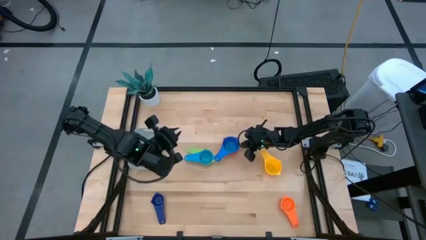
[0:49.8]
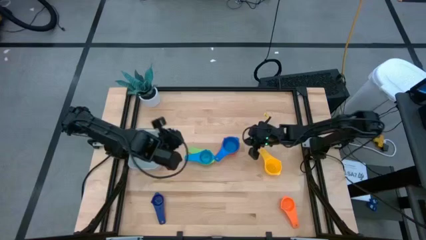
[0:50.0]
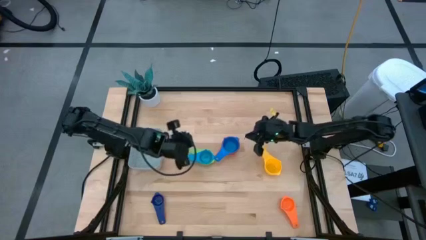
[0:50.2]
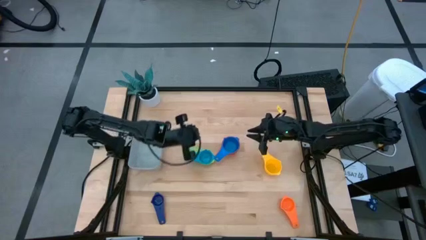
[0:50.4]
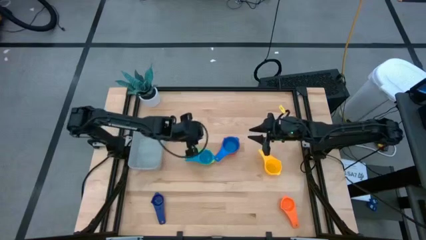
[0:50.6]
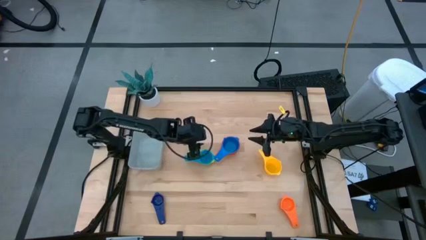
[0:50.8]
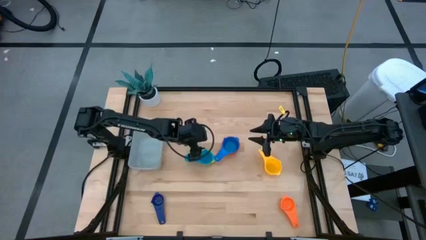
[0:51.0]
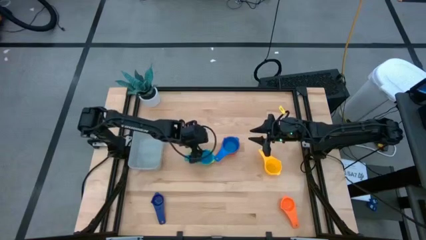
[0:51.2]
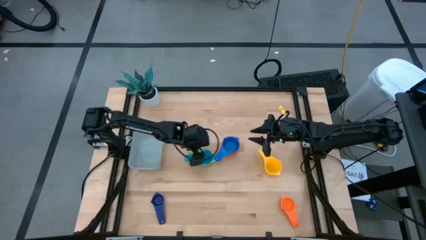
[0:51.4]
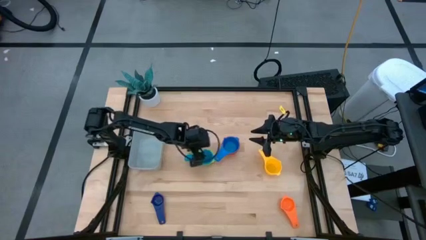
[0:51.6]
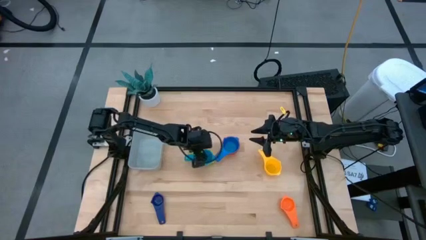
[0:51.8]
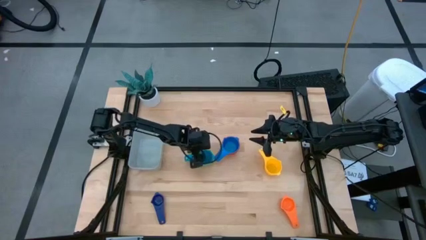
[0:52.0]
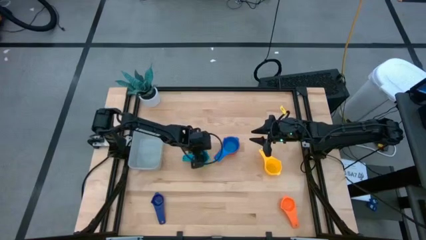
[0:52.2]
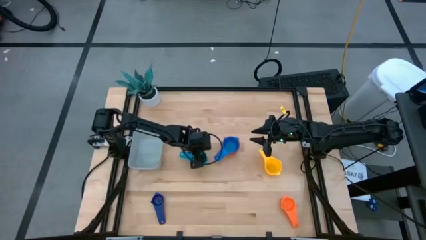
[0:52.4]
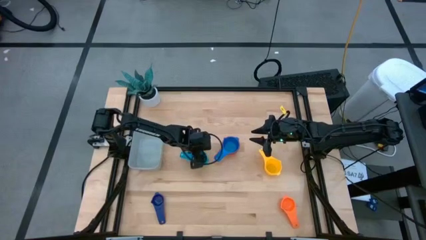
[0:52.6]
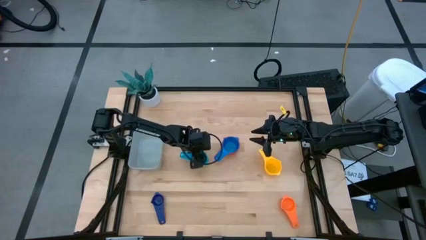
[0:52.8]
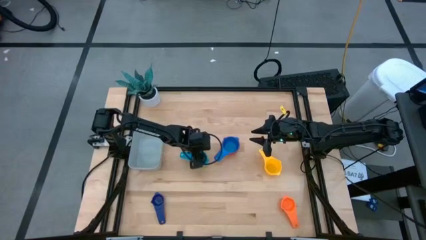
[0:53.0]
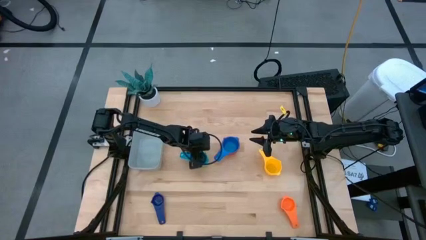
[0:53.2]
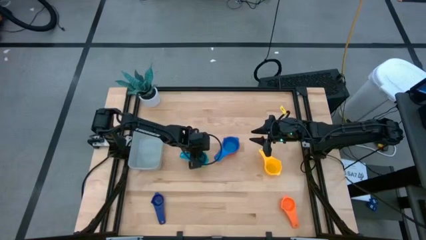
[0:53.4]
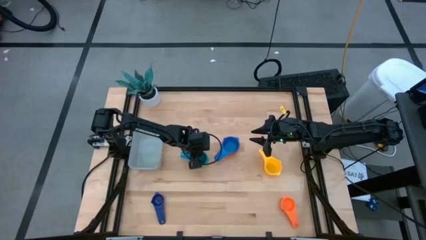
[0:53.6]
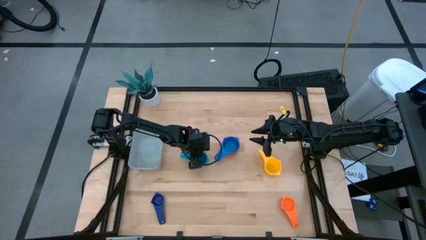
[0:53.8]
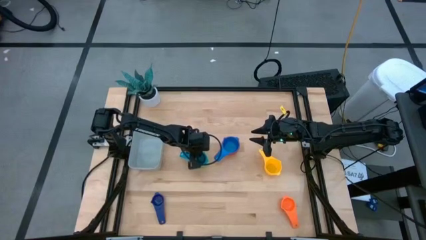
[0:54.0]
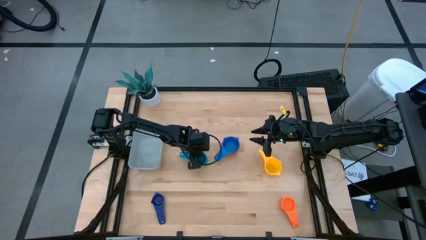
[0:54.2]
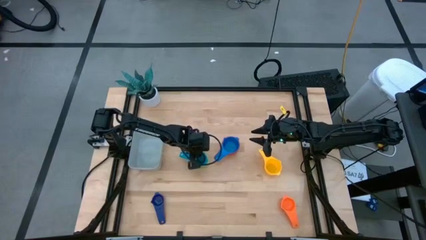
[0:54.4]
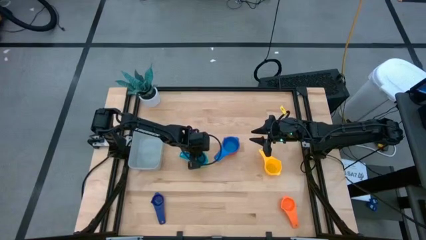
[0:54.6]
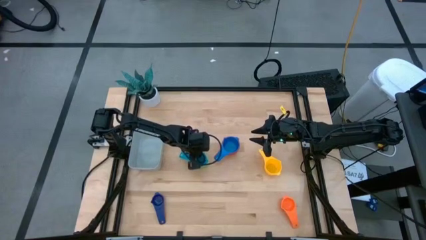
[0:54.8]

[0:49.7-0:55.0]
Task: Nest measuring cups in basket
Stack the left stacked measuring cups on top of the yellow measuring cup

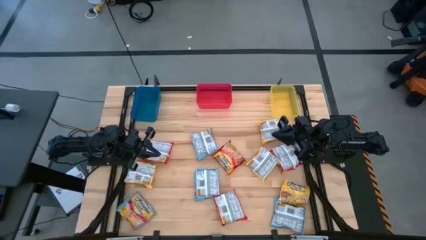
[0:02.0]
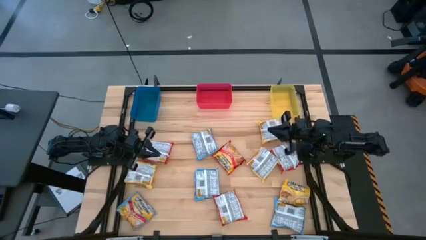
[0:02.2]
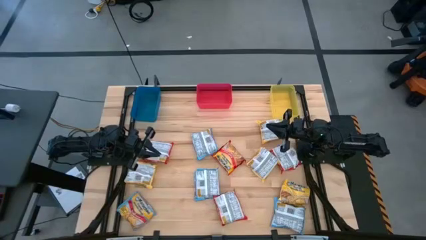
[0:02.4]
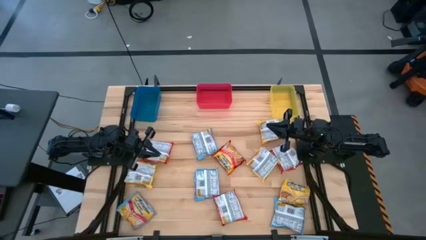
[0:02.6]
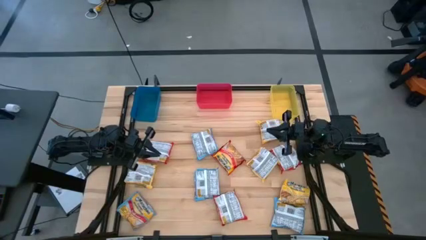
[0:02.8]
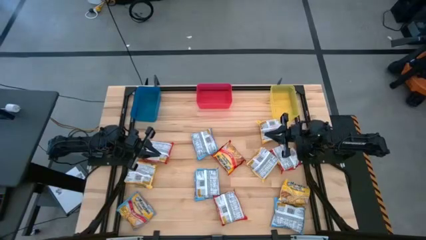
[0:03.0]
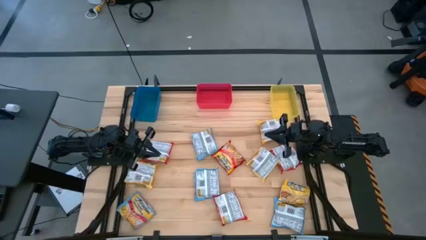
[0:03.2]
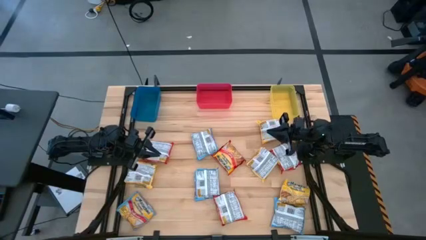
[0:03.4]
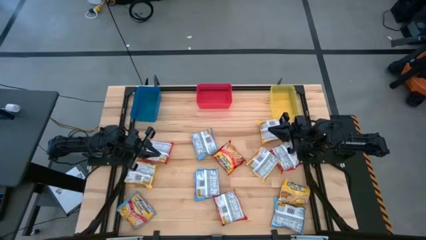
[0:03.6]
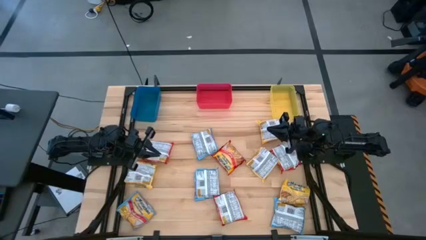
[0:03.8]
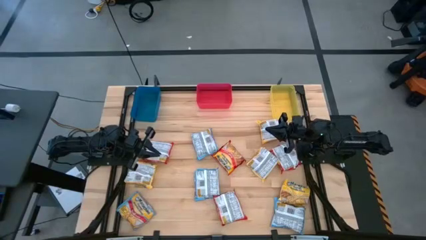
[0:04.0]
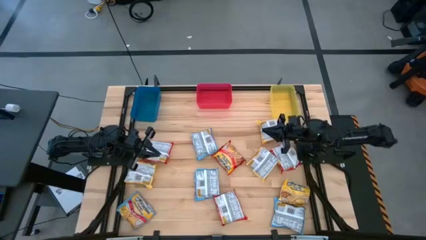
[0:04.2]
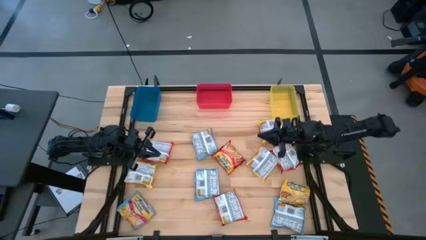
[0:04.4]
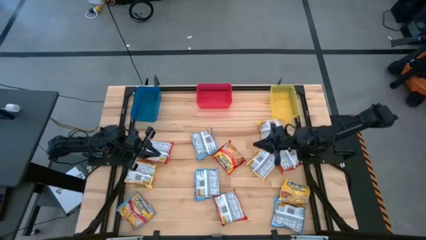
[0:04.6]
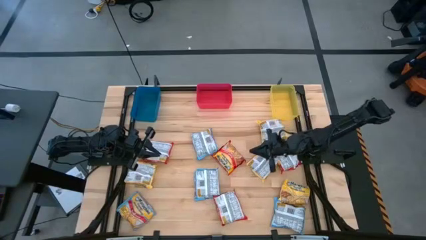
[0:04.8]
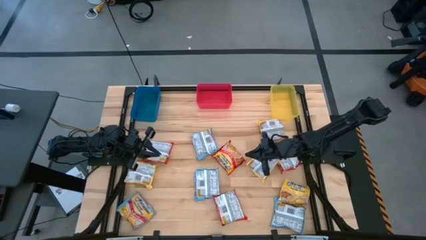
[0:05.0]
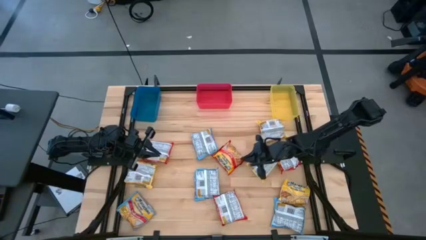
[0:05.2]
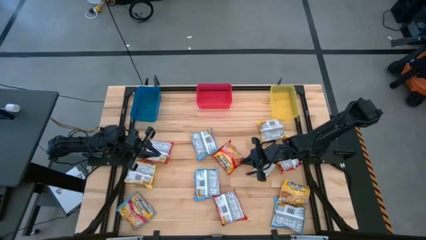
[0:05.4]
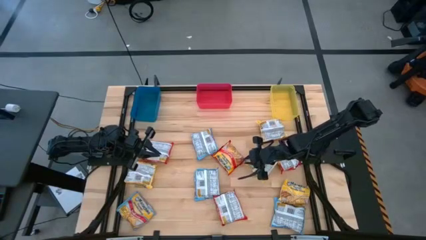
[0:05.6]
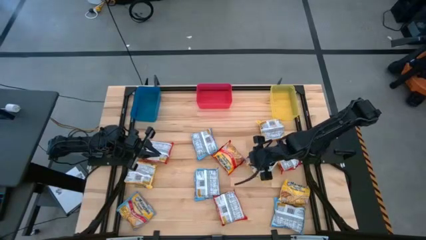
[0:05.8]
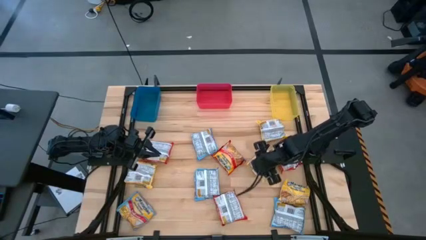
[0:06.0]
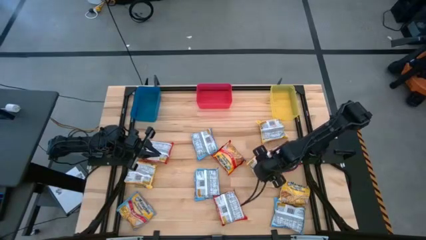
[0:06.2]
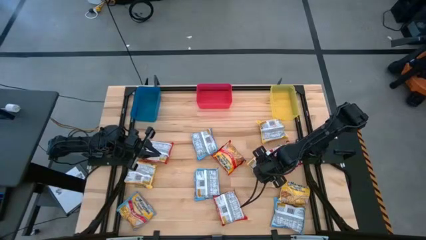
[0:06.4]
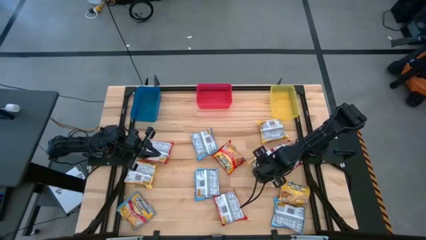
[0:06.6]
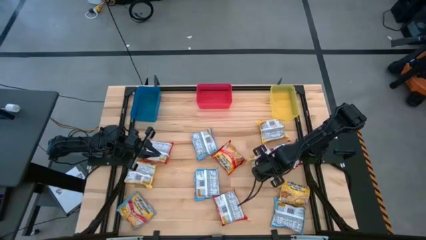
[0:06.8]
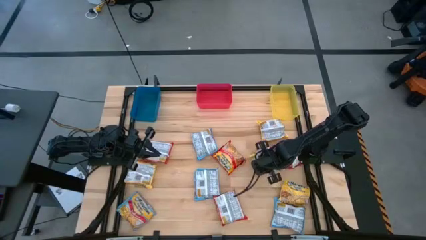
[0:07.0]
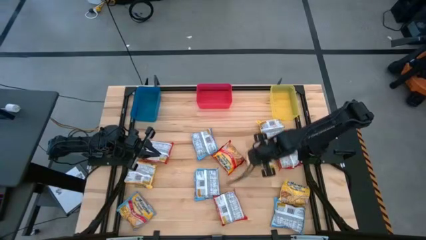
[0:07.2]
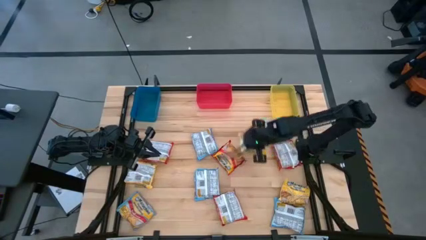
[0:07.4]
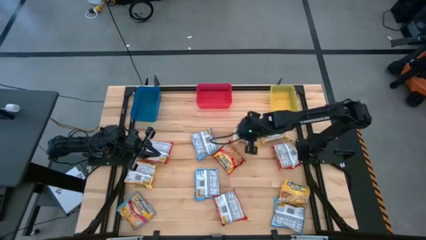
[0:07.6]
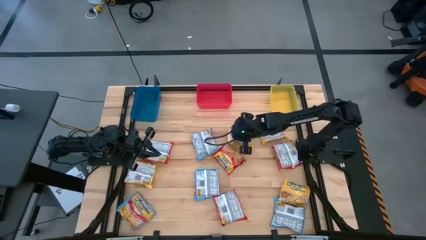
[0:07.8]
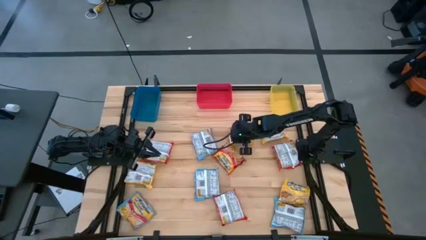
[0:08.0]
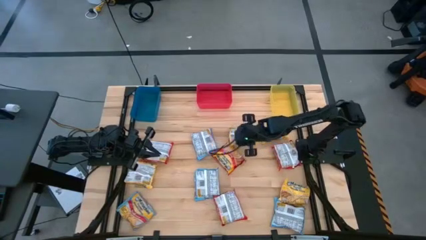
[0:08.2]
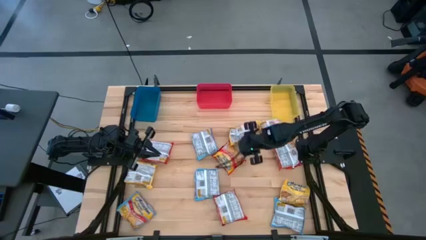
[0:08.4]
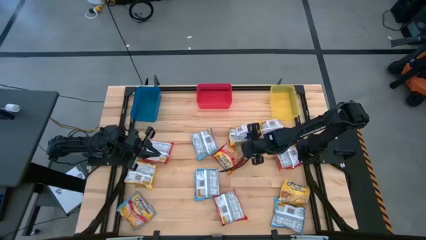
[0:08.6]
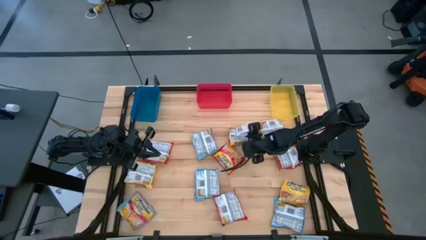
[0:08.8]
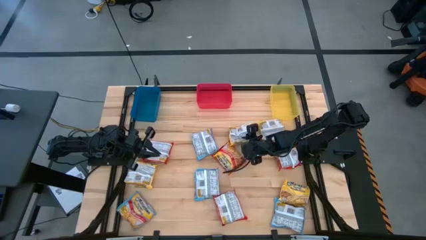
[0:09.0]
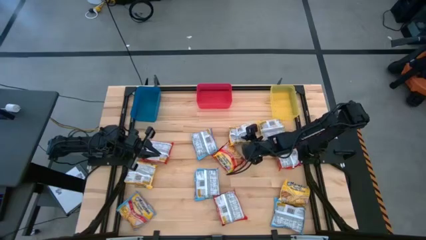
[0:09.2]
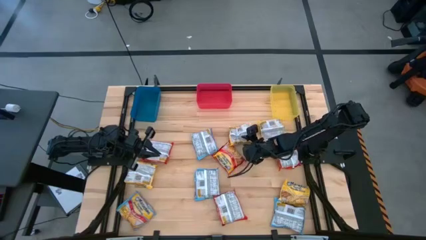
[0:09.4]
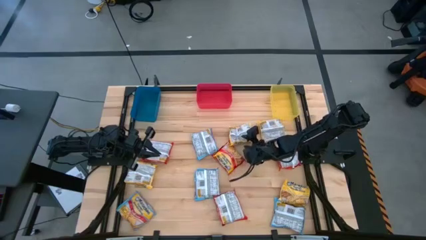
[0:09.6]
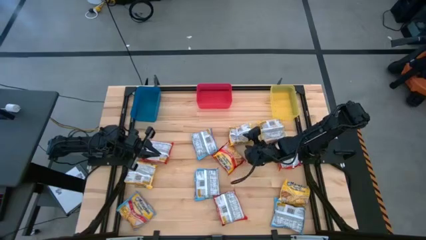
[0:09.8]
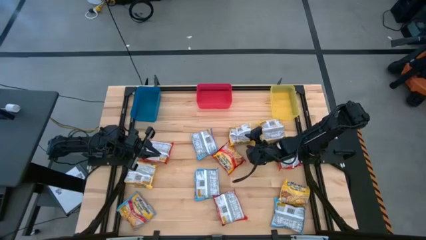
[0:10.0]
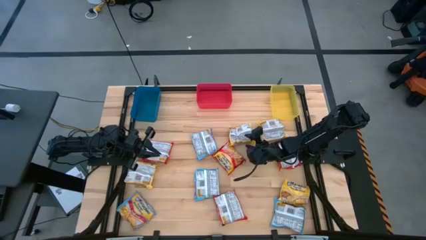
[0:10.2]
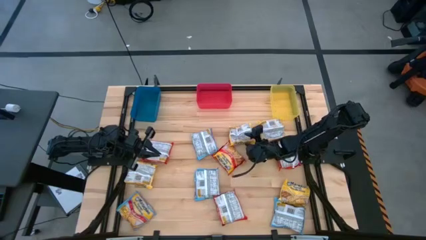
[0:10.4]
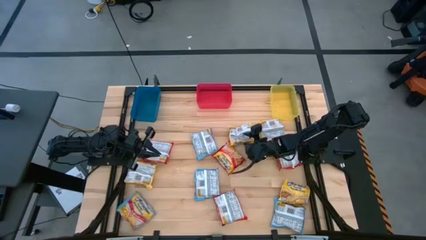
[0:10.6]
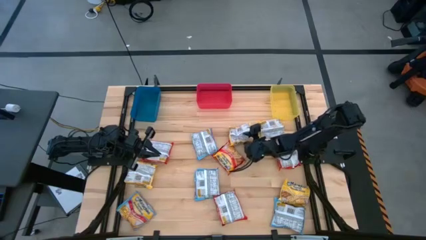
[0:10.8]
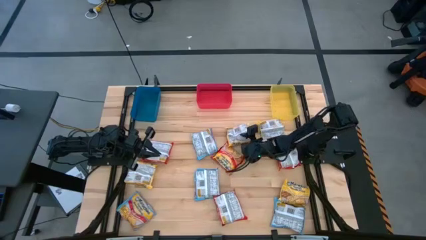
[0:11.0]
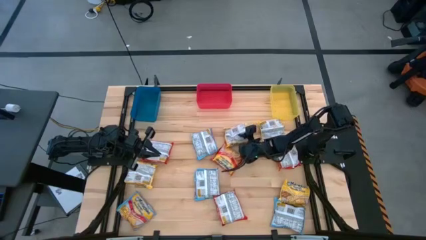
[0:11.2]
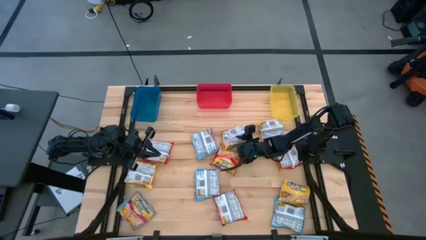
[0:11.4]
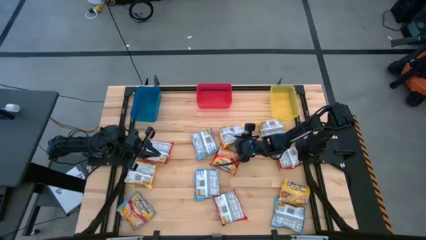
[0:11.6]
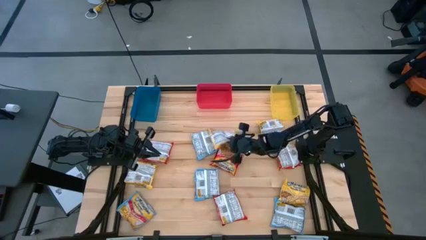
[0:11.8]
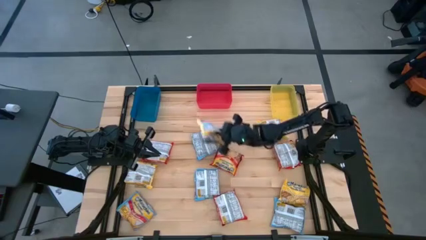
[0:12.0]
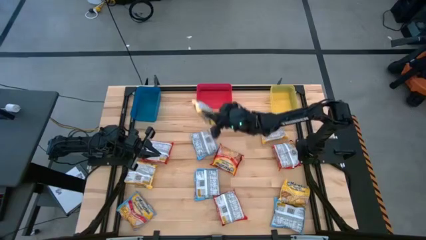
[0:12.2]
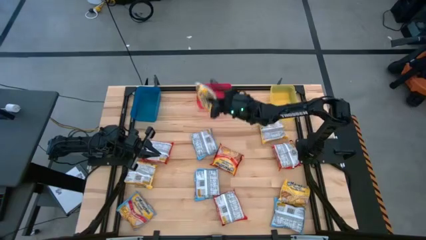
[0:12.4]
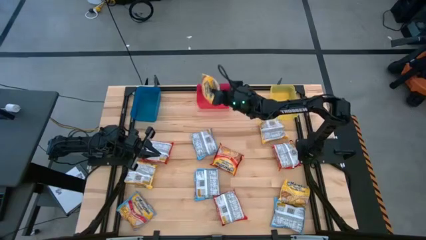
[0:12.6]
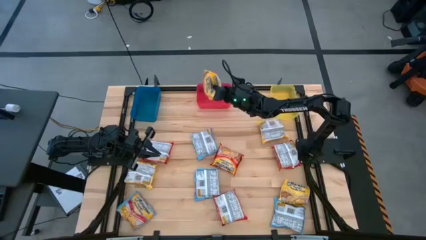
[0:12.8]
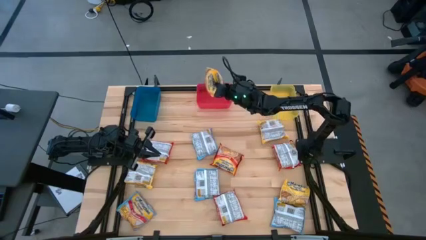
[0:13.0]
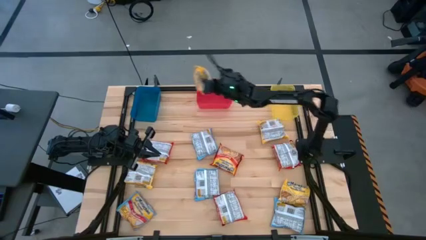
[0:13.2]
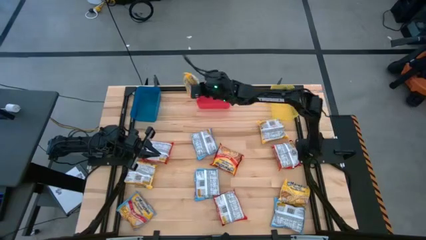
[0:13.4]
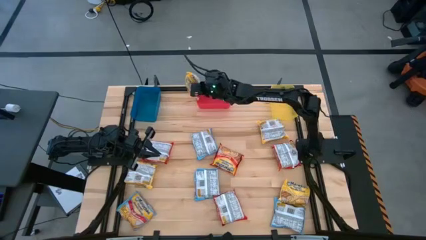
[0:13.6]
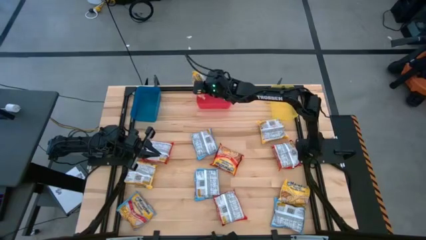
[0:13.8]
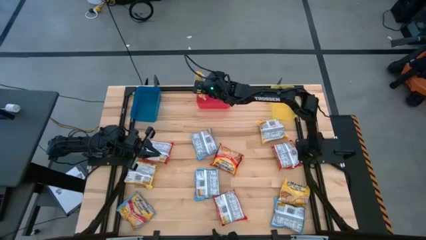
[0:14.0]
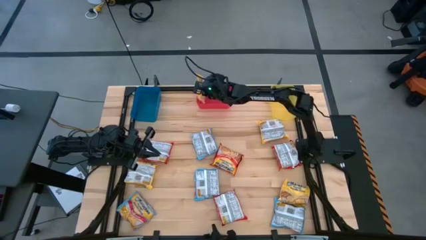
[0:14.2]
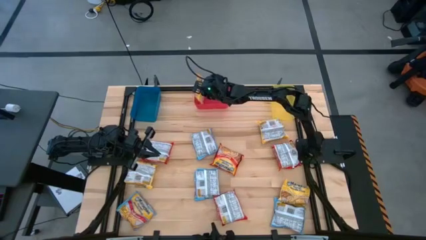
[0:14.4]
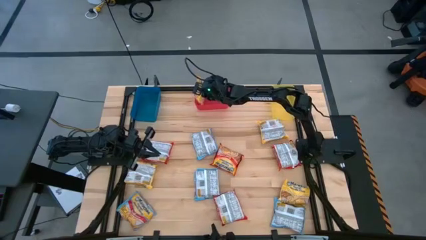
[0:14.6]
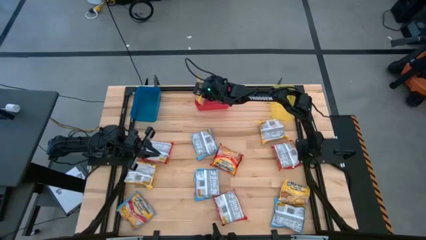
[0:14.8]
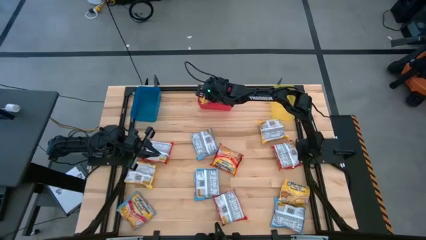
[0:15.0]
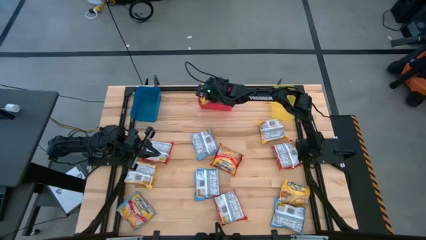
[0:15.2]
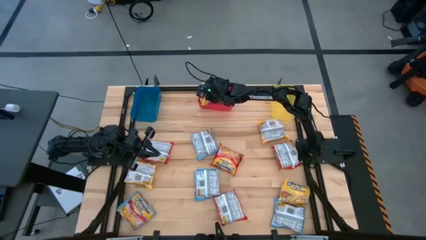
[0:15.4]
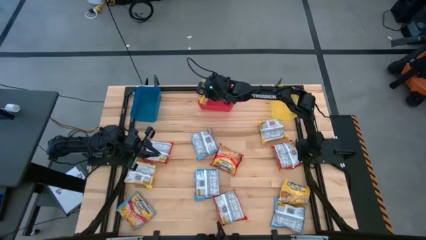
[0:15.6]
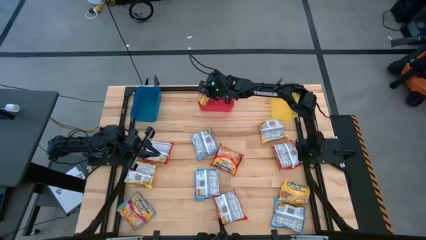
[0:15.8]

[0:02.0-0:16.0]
Task: Sort Maruchan noodles
Put the yellow noodle pack into the red bin
